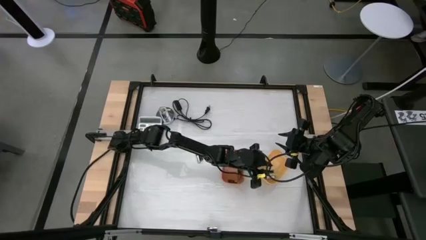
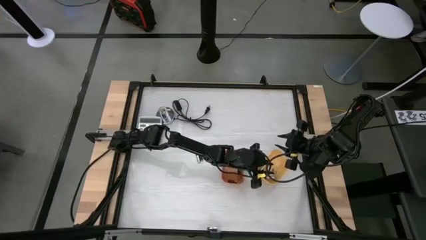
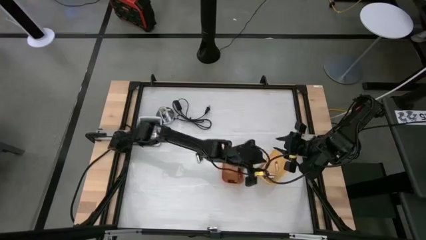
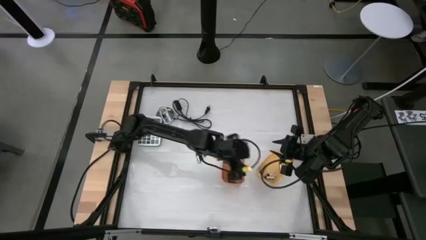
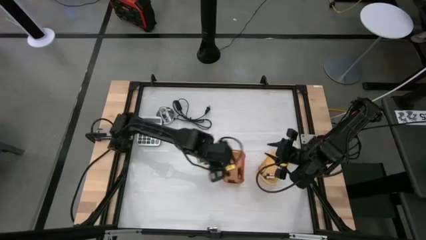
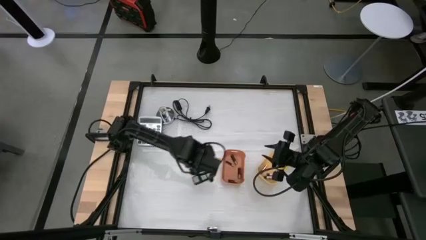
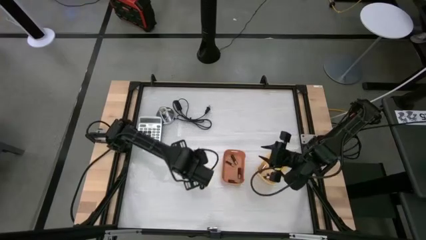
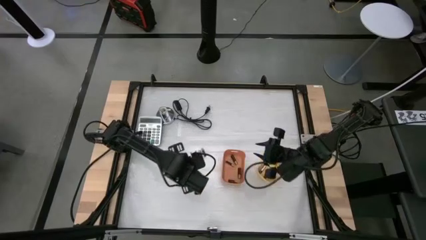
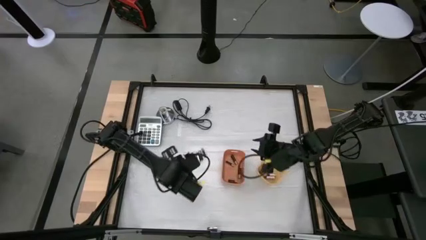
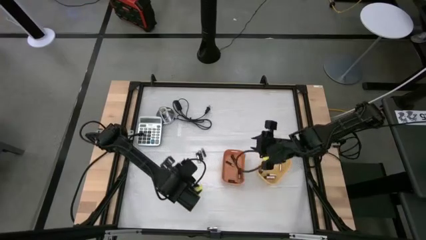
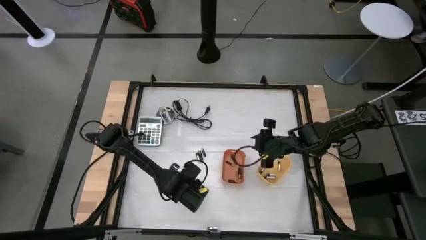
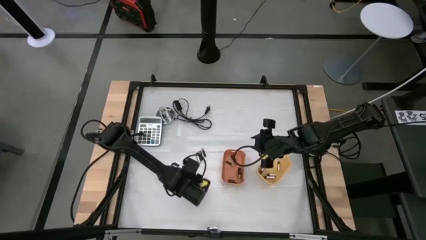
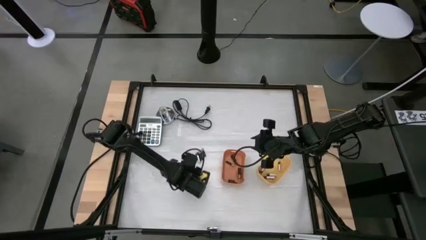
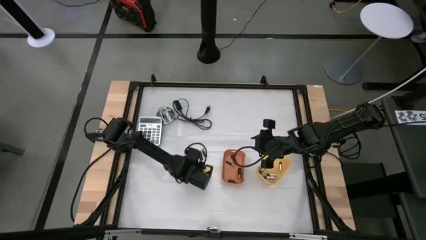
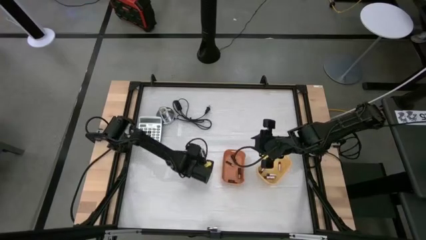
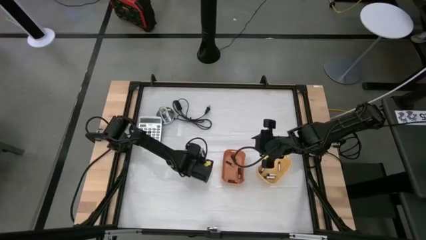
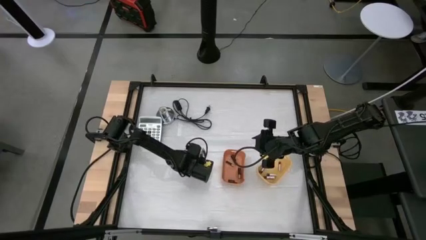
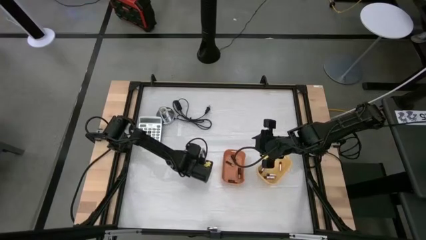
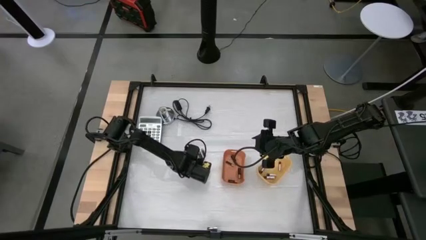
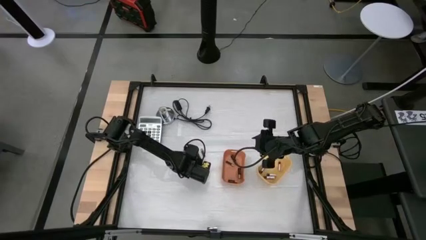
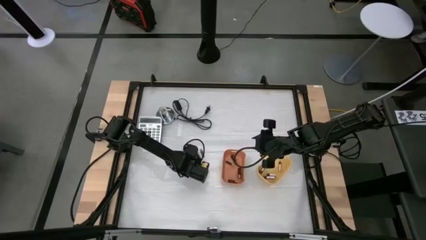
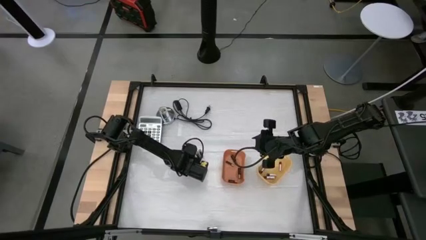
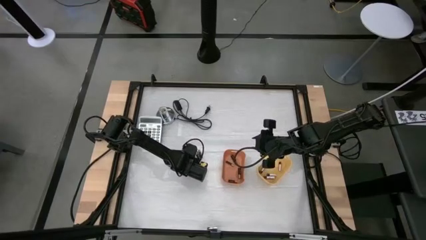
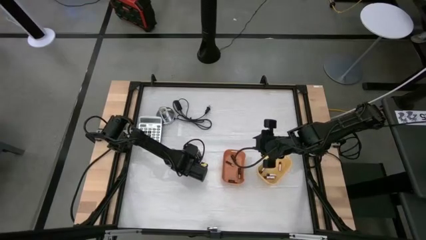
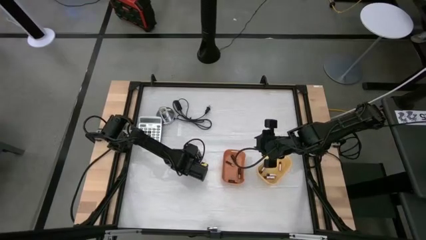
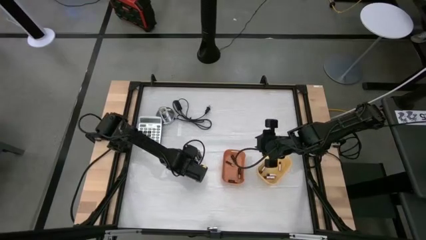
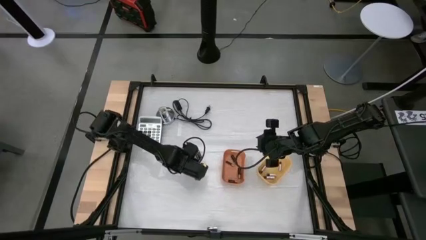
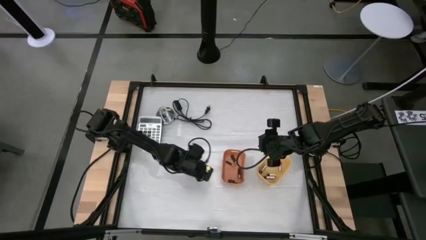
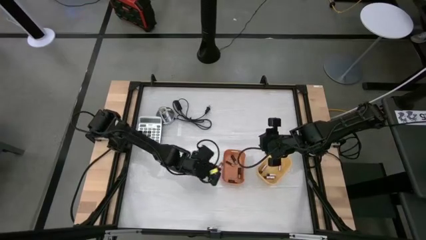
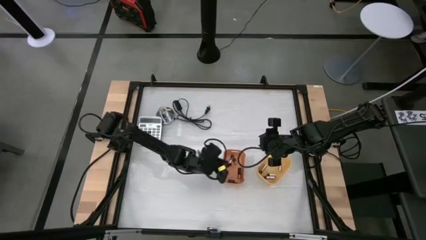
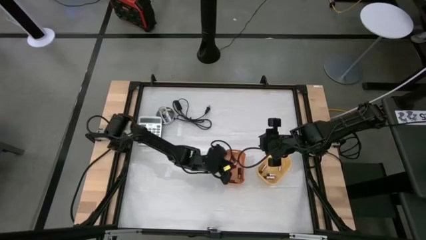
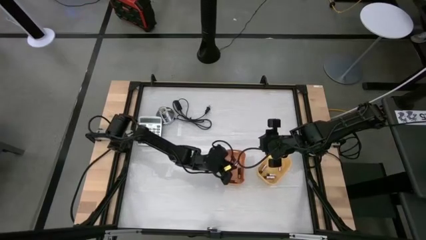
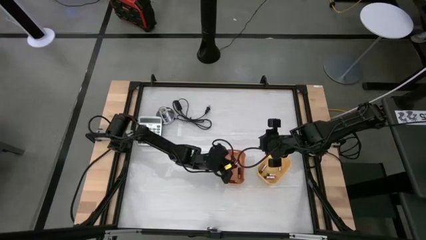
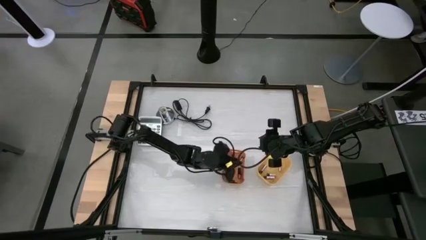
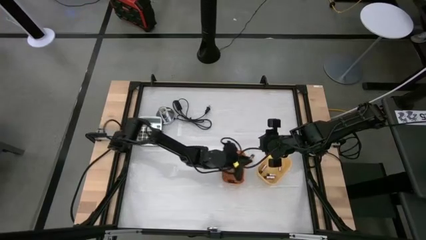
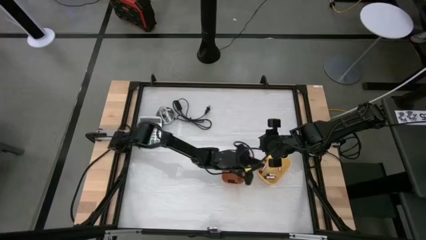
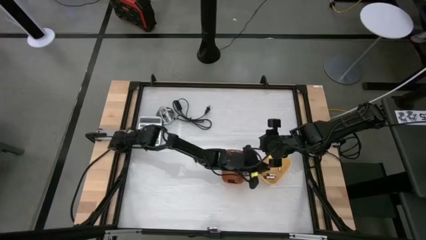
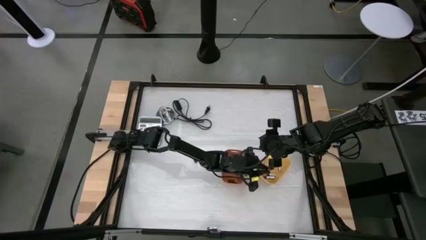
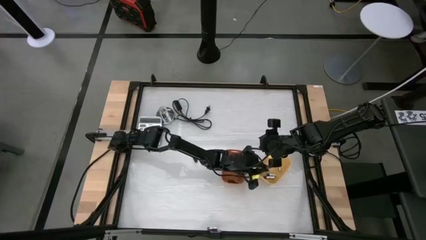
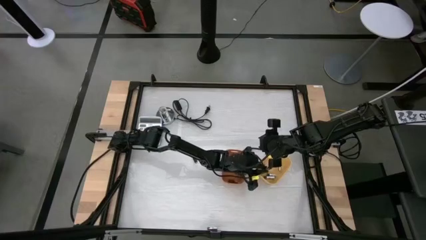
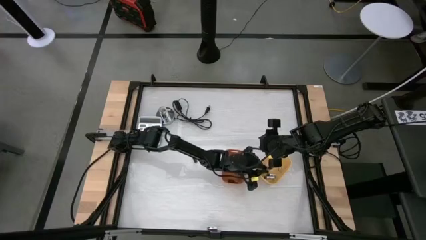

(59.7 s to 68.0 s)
Task: Sort batteries
Put the silver battery into the yellow bin

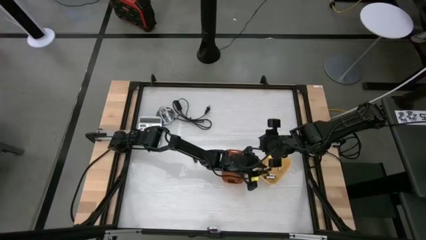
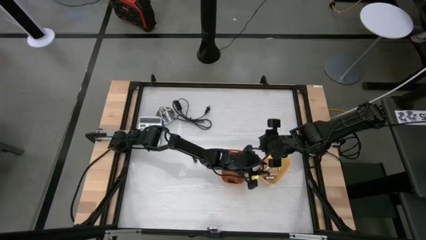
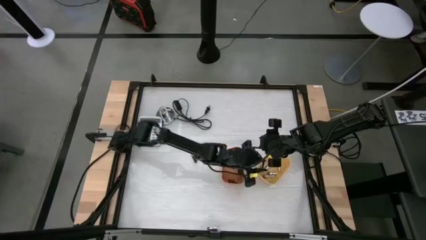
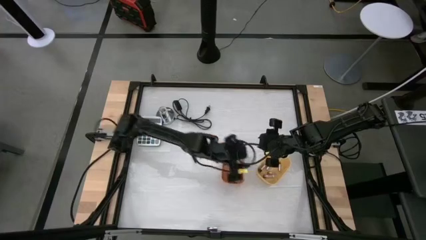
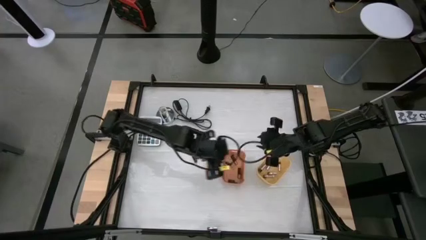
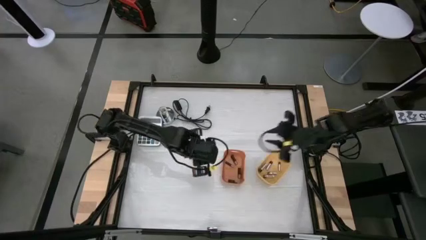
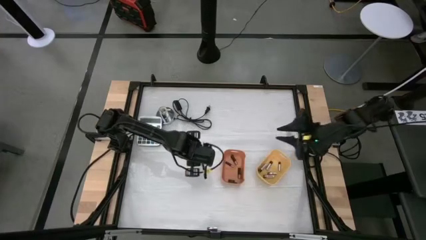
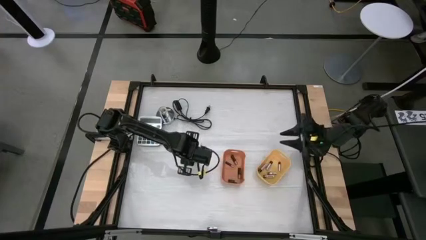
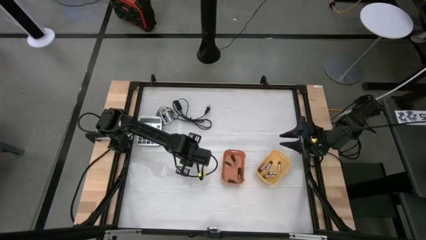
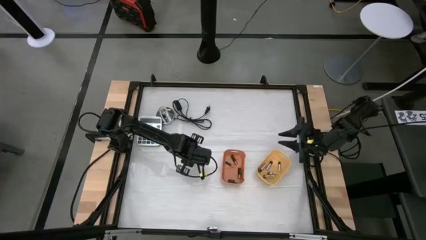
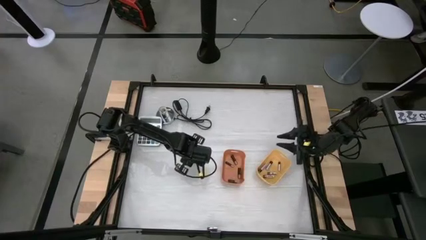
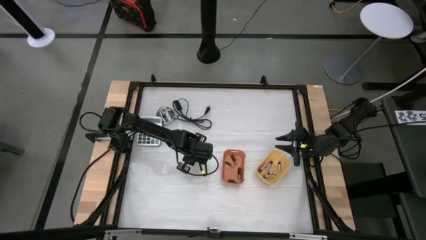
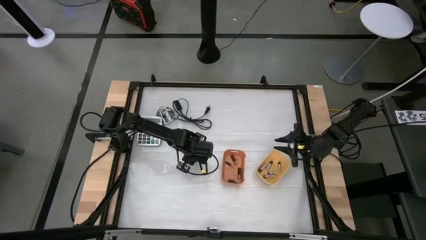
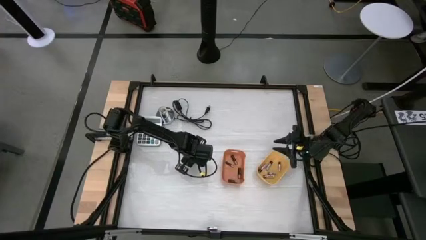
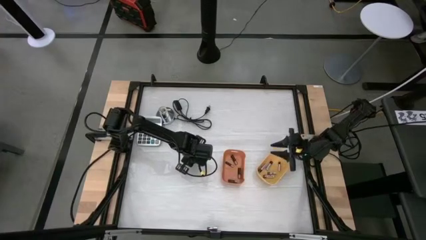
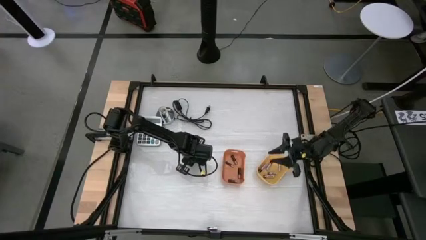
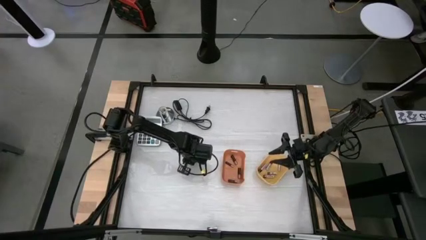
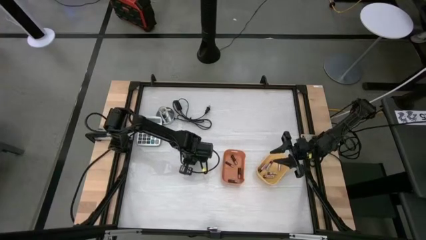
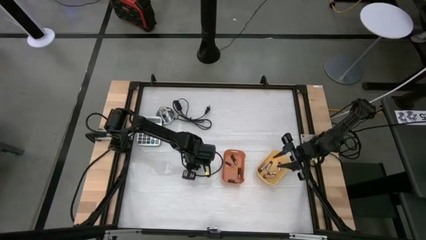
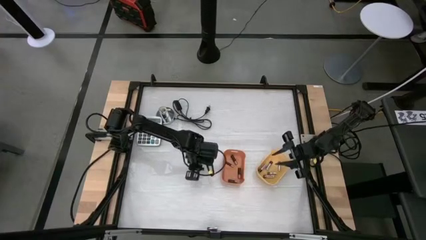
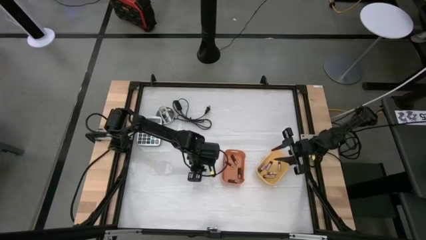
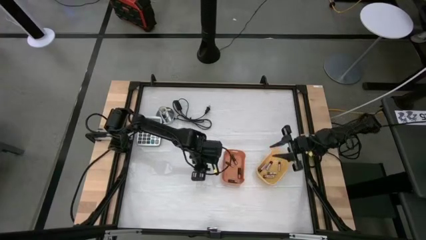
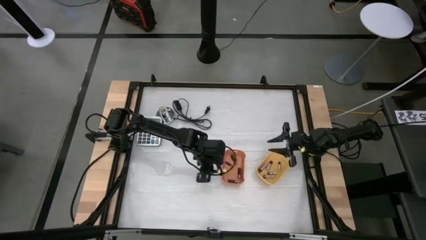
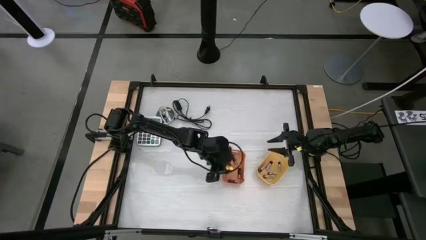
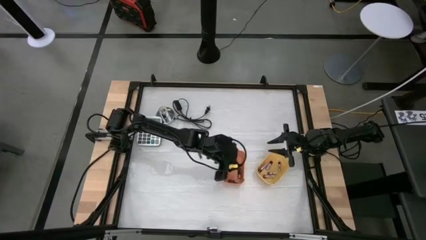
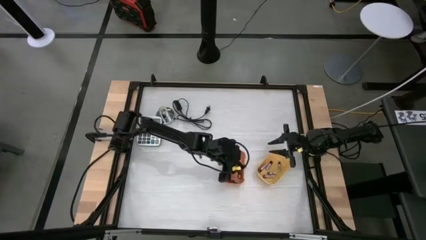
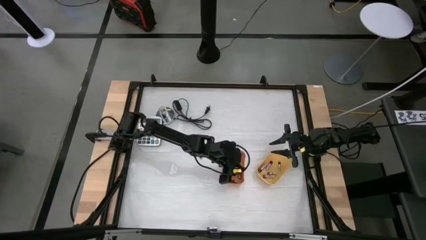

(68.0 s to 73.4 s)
Put the black battery into the orange bin

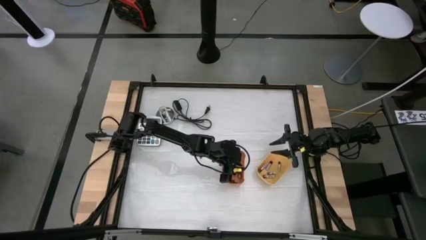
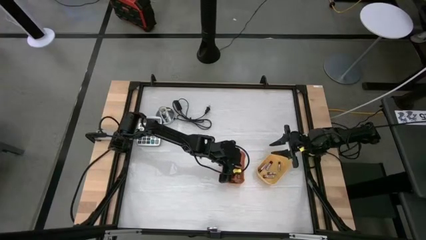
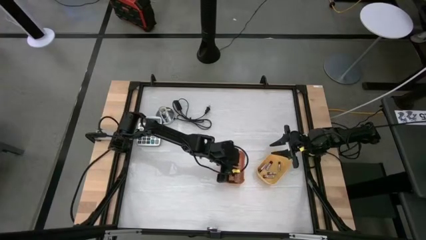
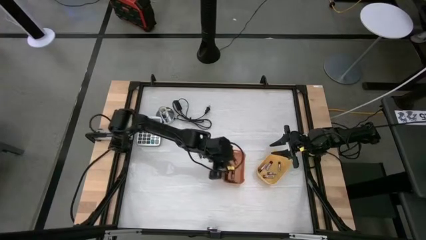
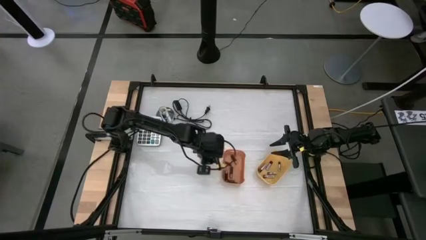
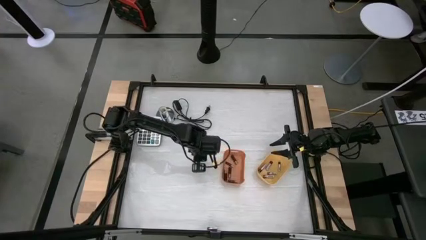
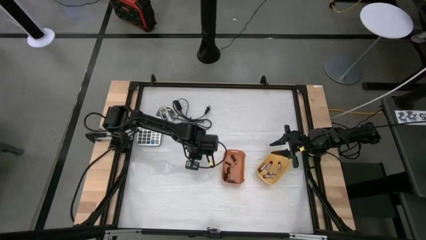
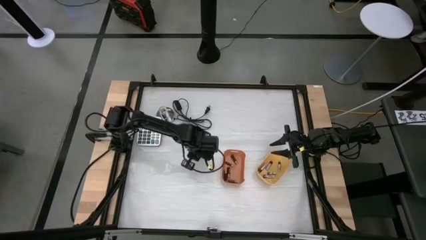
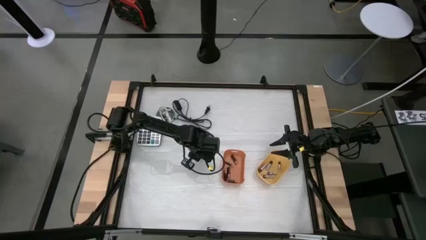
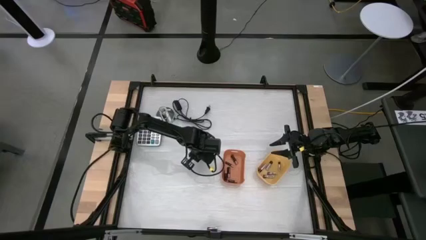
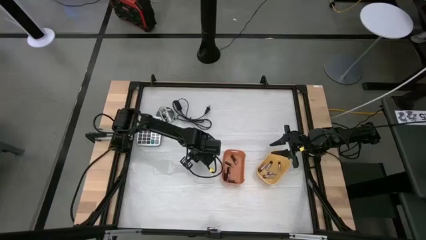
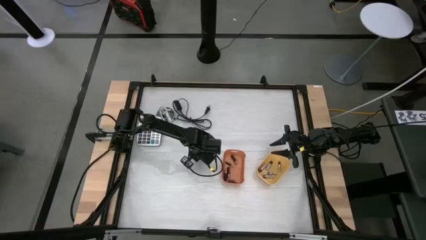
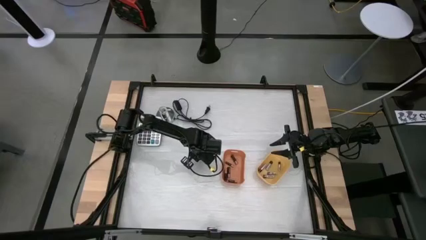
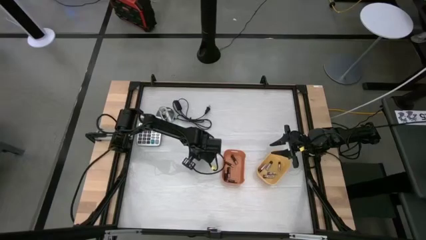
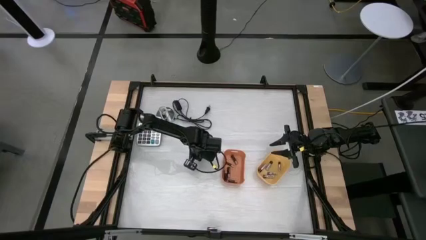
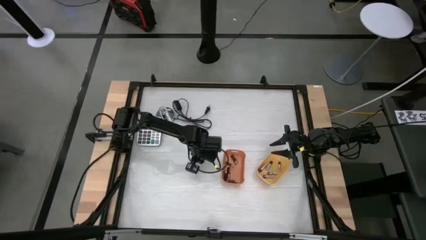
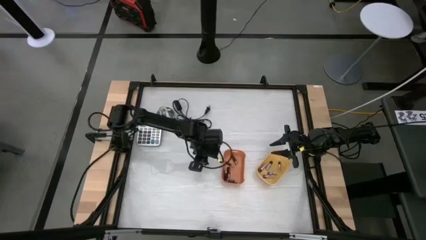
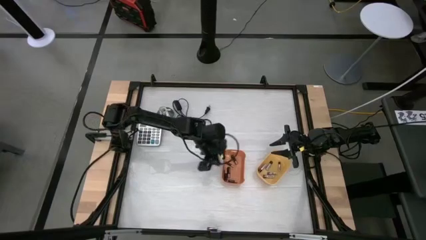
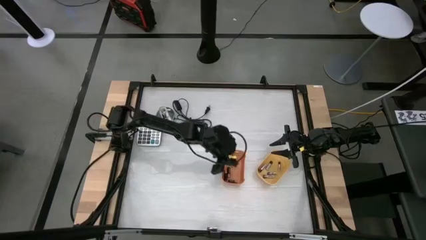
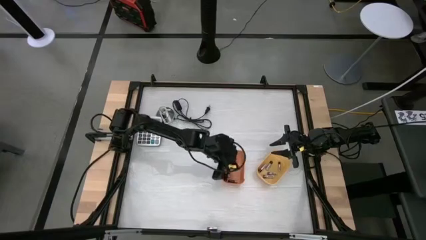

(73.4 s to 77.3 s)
Put the black battery into the orange bin
